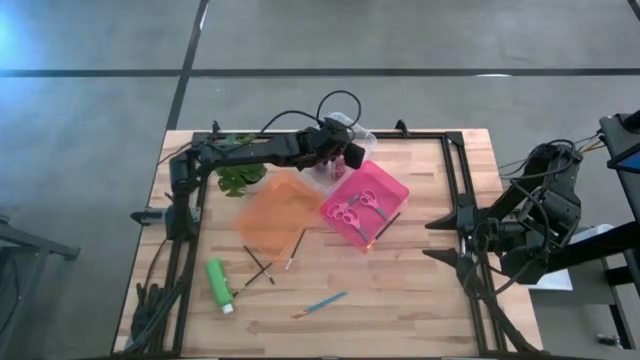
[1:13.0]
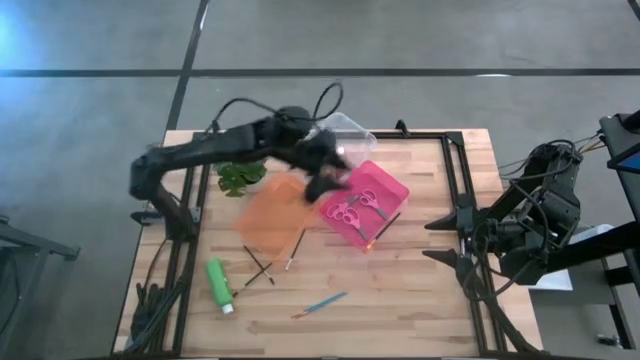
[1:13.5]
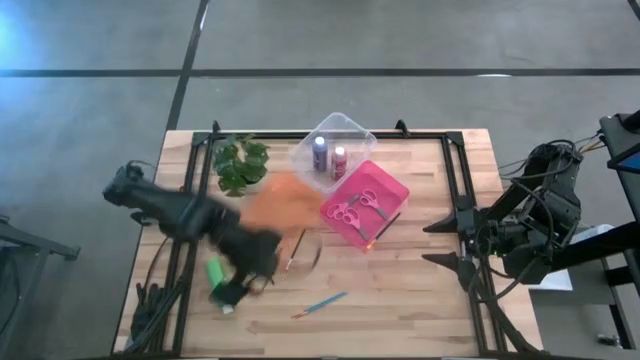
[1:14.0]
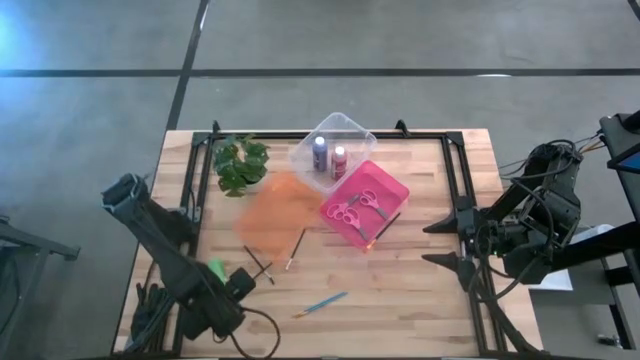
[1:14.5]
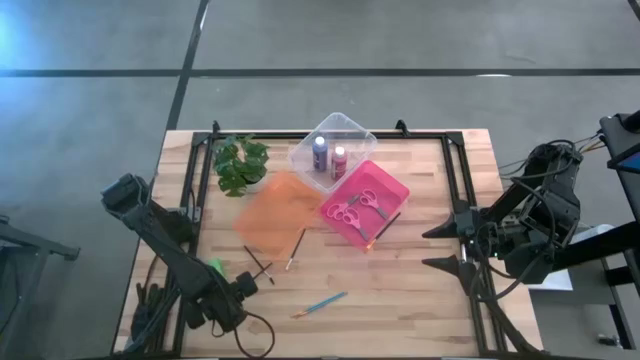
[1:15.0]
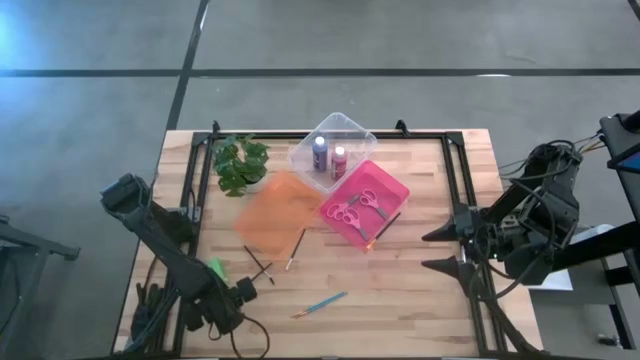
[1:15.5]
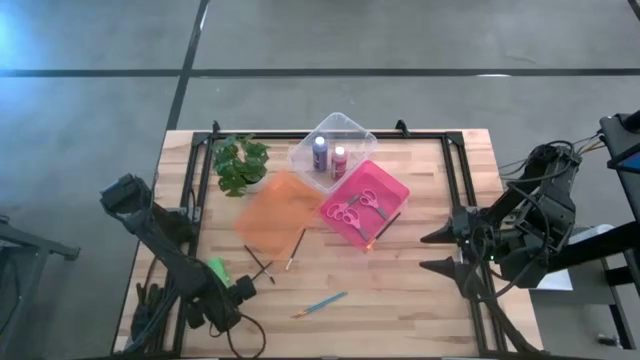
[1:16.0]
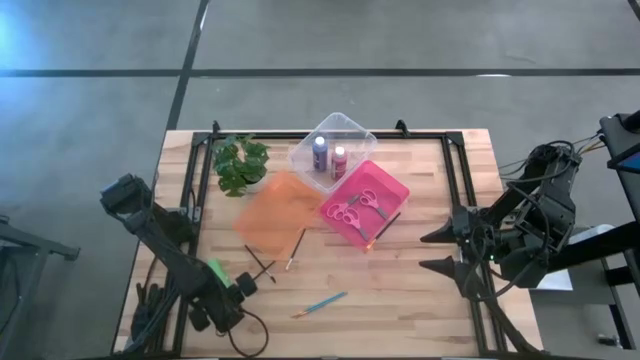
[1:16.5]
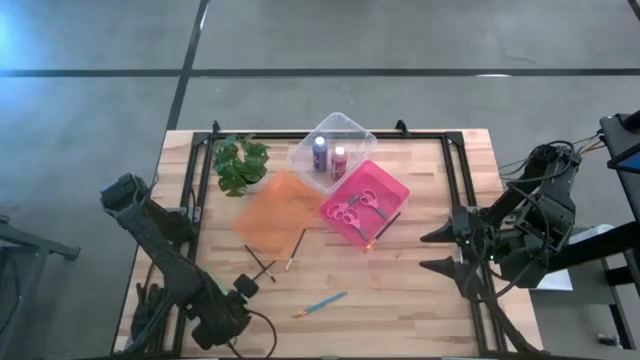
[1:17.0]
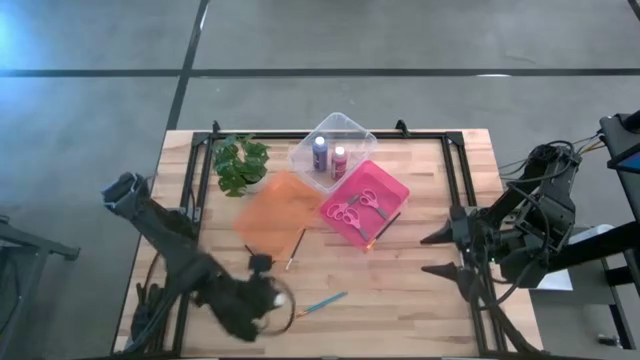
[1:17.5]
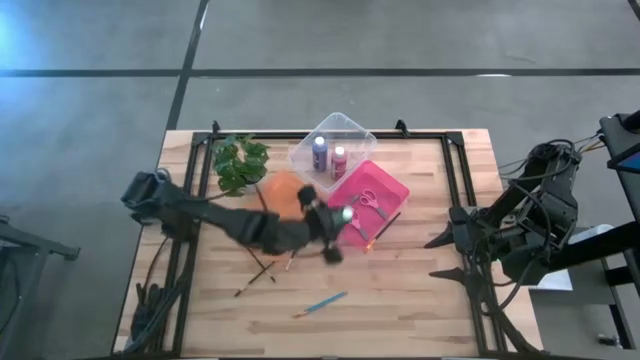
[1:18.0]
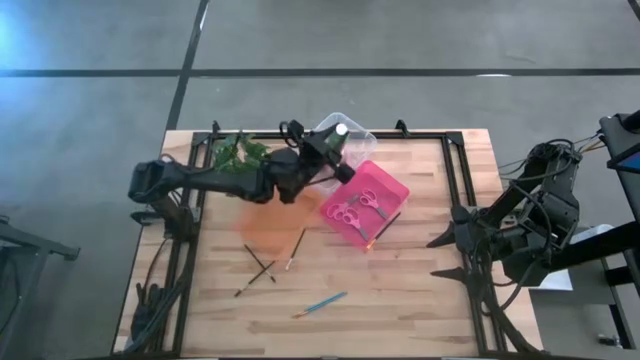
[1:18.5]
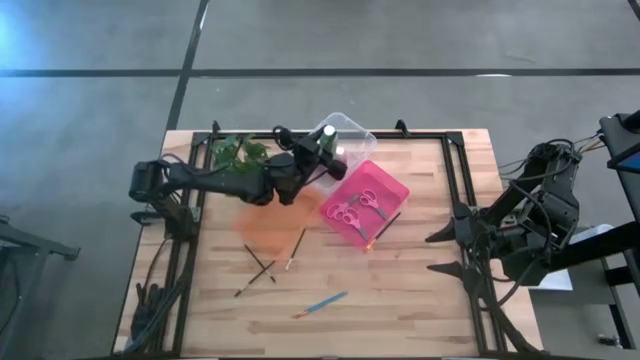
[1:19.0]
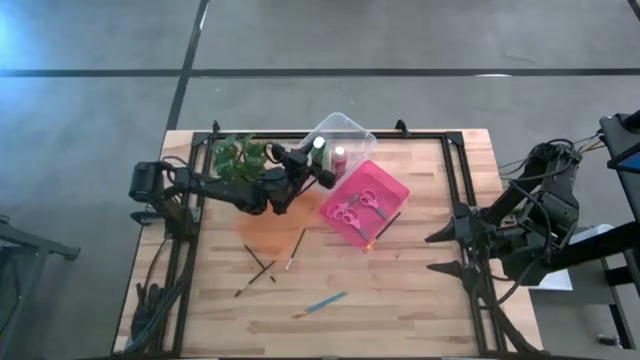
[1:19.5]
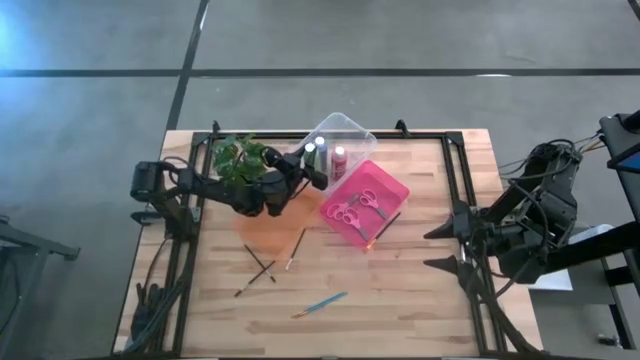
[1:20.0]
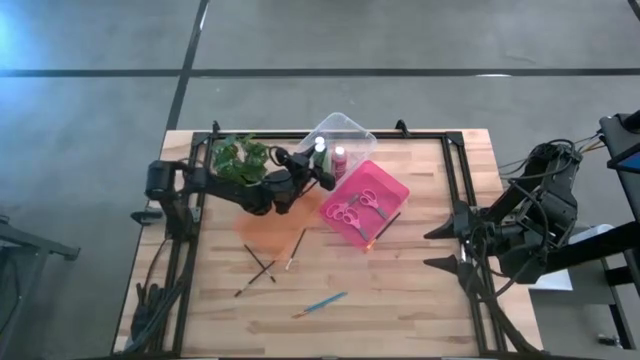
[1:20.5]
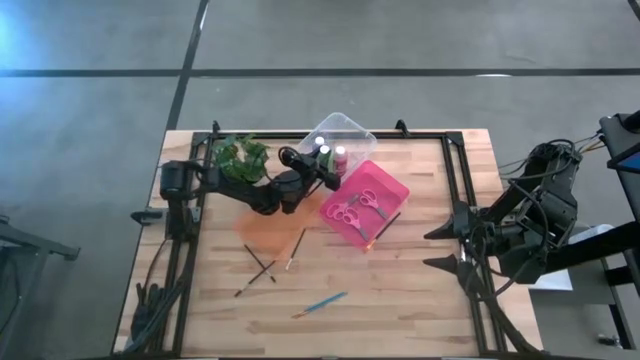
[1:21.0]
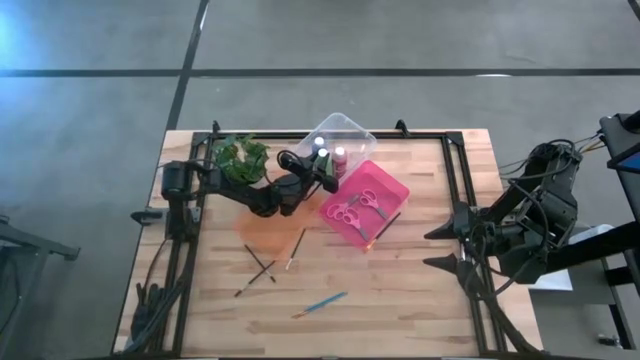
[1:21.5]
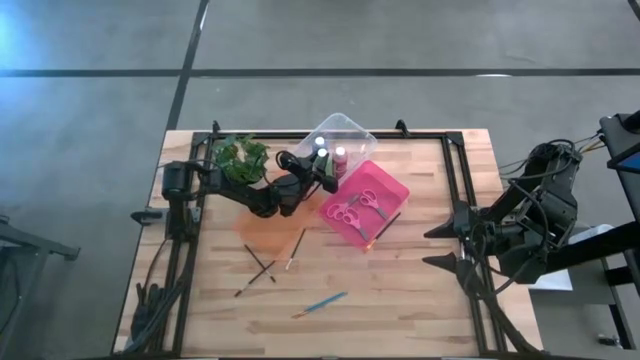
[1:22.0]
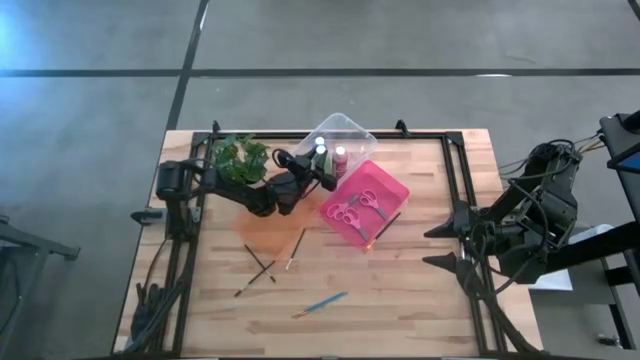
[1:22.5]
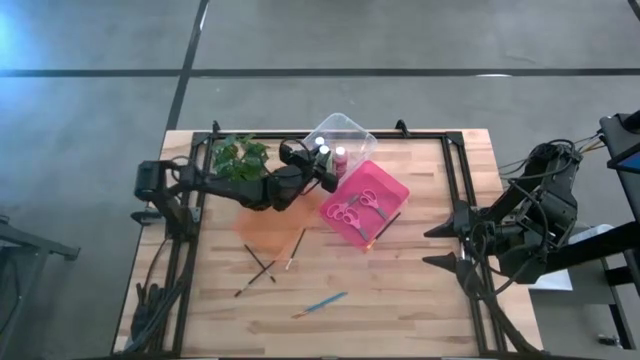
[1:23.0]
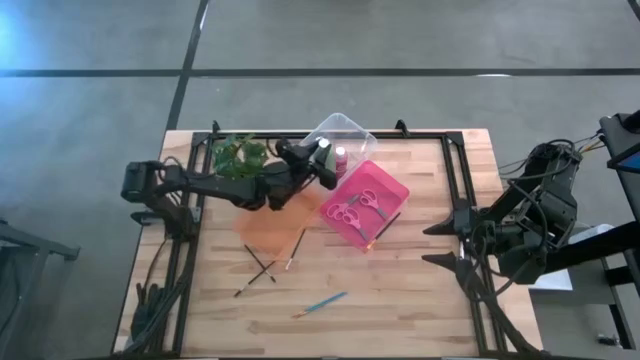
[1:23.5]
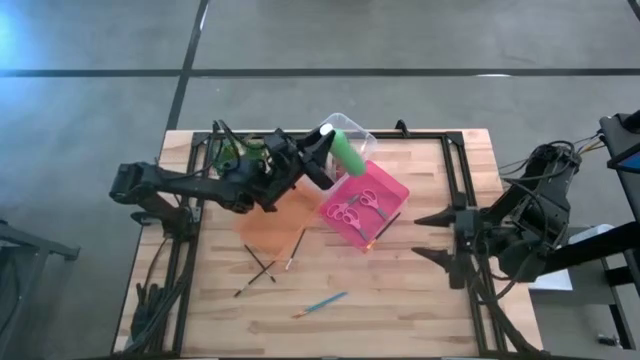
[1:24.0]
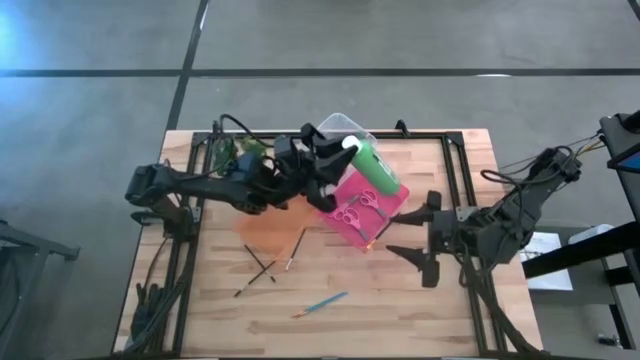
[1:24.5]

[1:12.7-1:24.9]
Task: Pick & Place Paint Supplies
Put the green paint bottle into the transparent bin

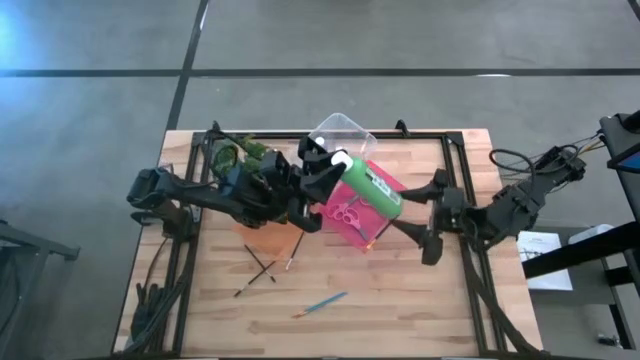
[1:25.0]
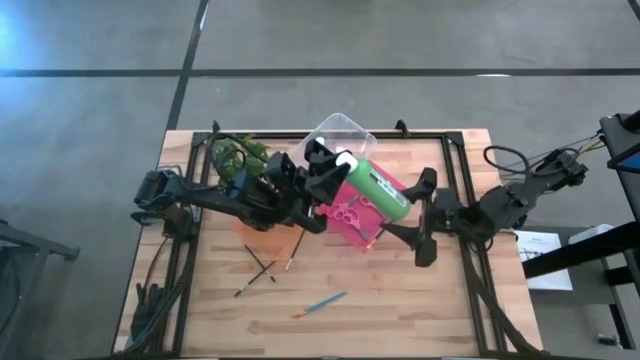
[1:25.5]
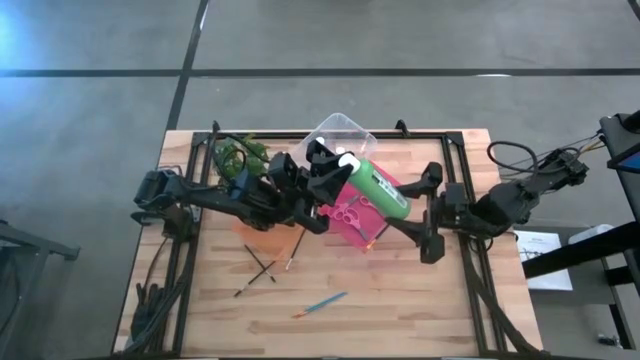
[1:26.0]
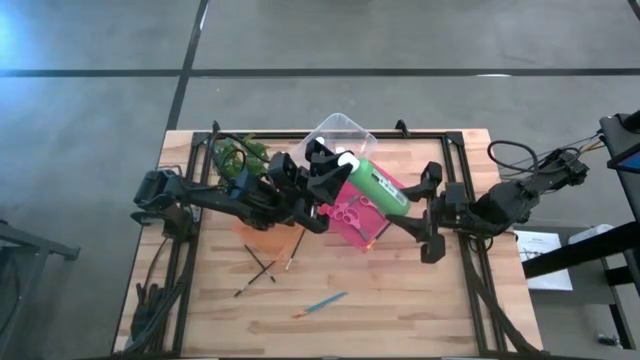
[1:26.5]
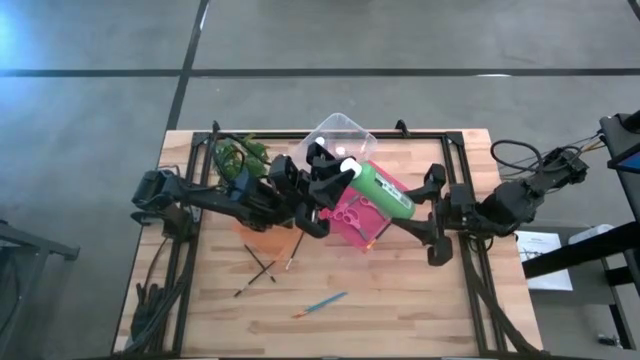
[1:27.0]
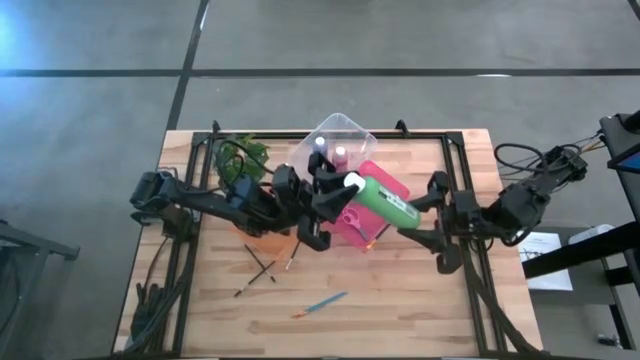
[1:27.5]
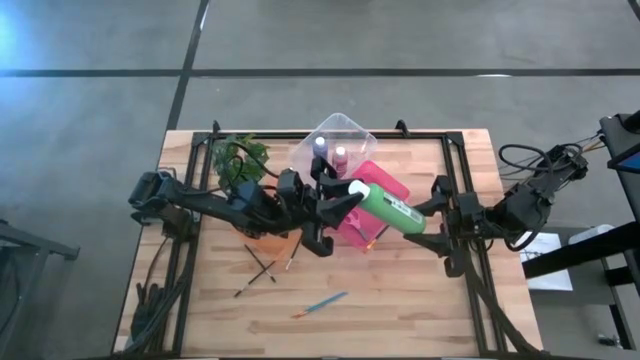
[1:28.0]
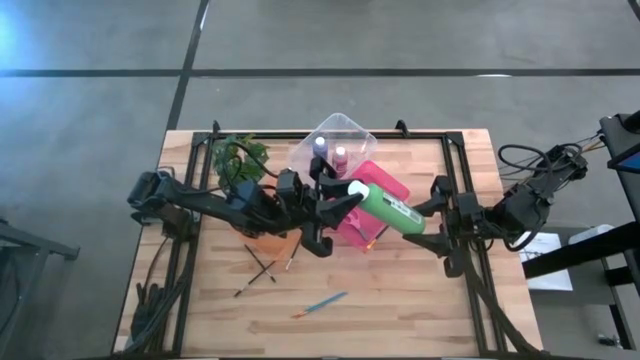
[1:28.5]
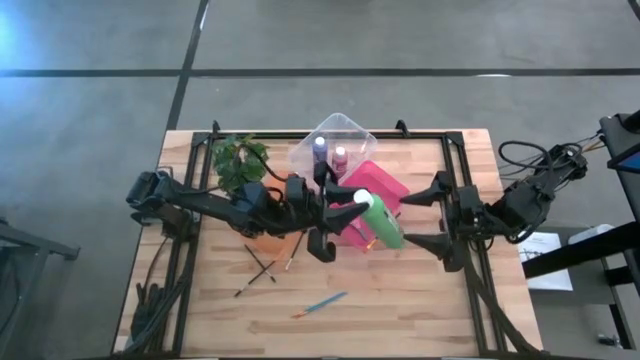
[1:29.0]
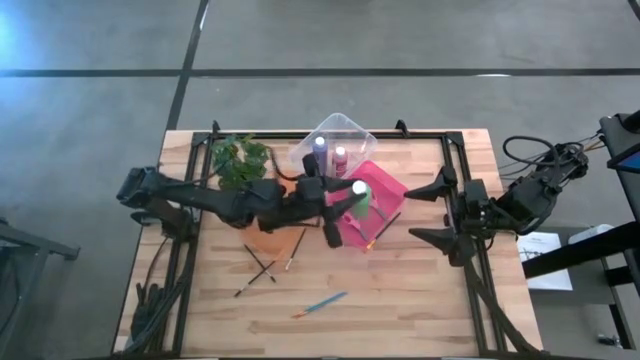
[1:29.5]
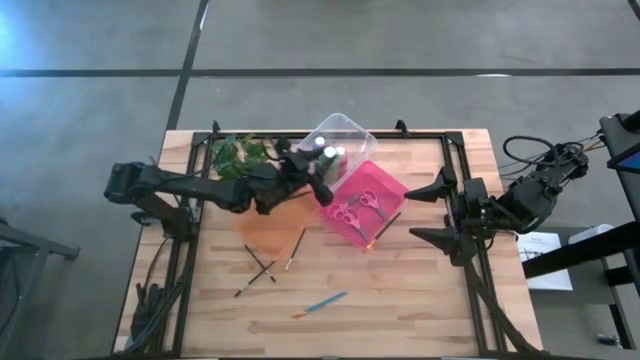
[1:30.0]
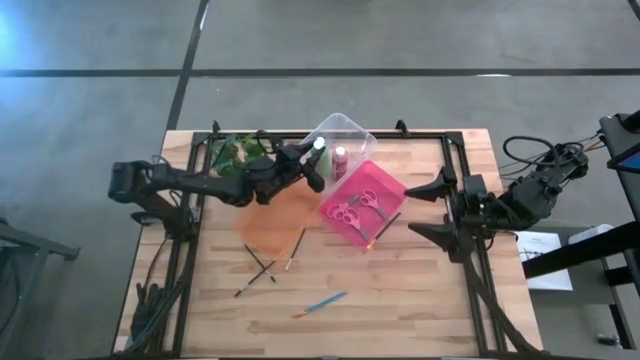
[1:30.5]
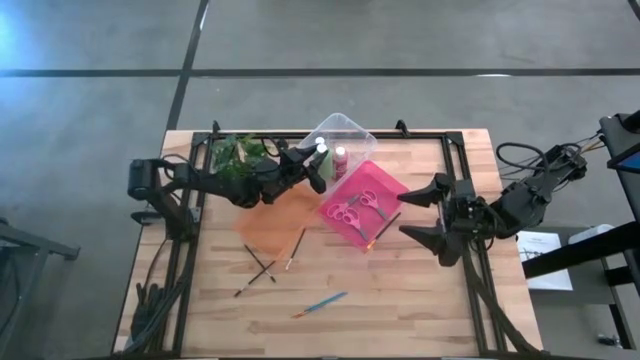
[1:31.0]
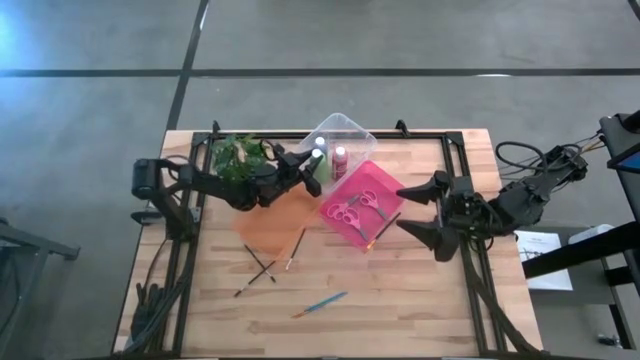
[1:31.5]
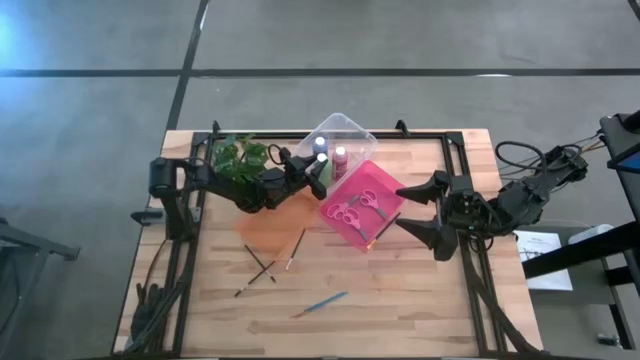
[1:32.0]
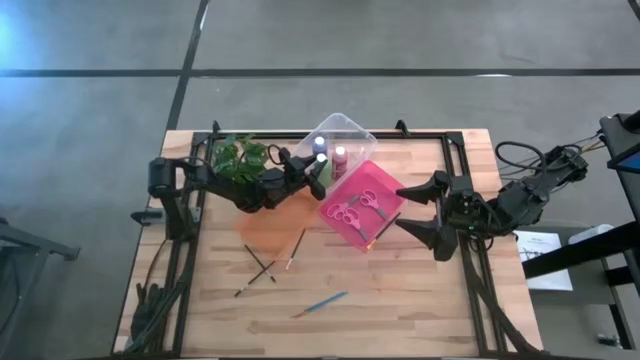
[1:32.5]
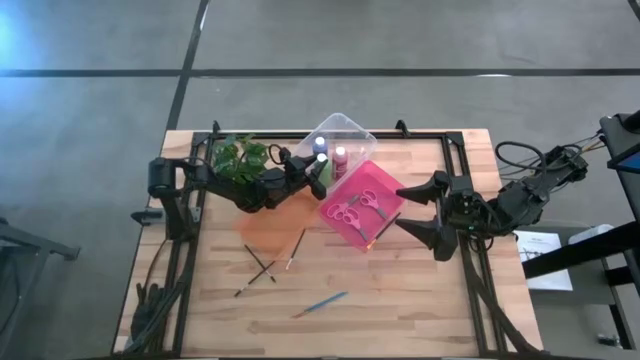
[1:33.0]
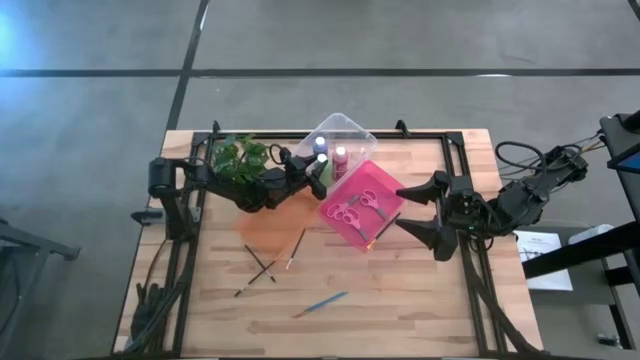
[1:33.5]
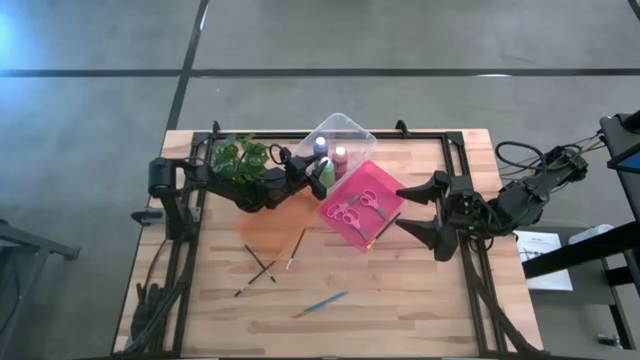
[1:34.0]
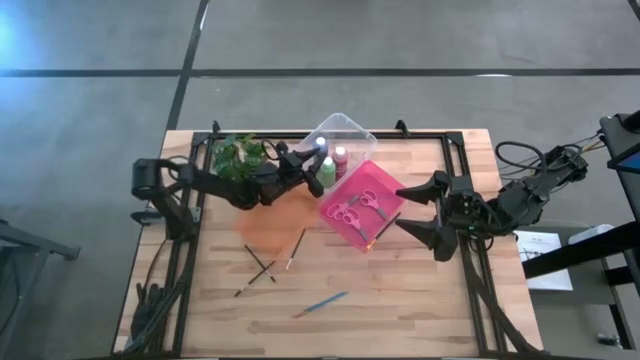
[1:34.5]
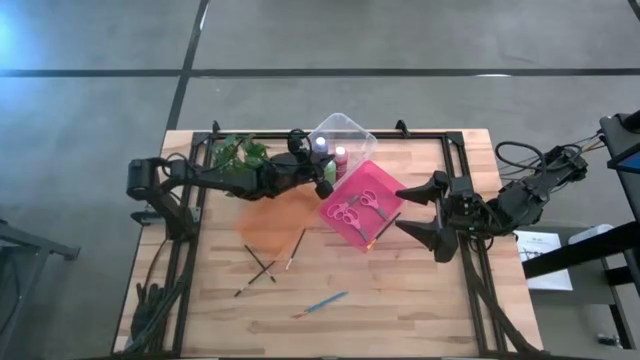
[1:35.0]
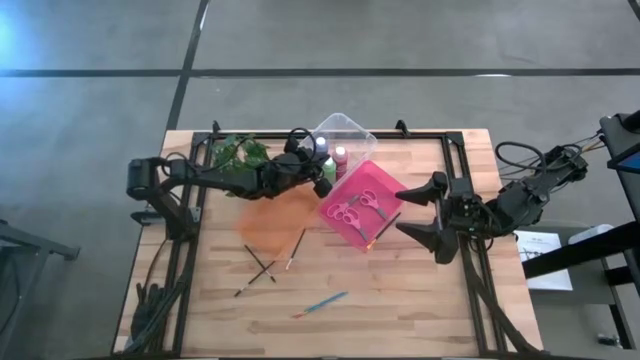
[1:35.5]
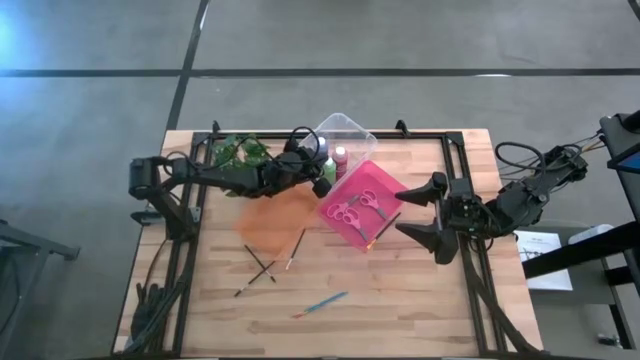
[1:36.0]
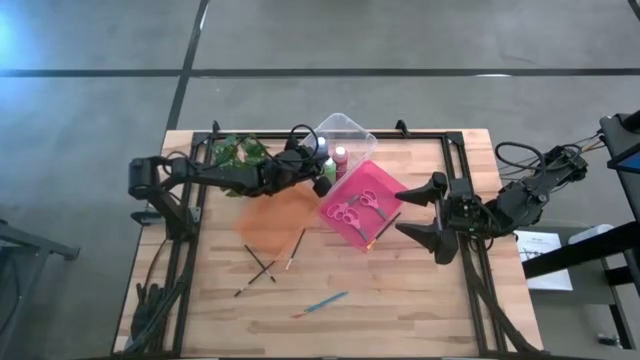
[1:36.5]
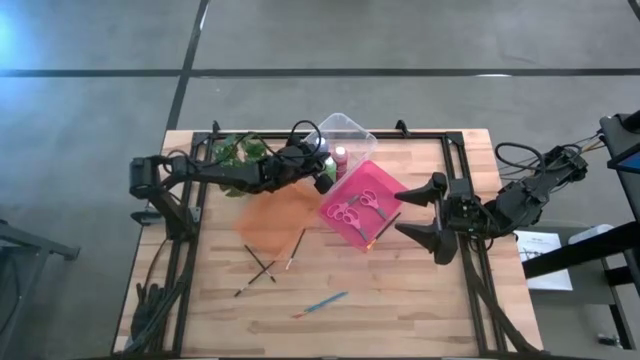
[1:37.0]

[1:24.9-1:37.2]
Put the green paint bottle into the transparent bin
